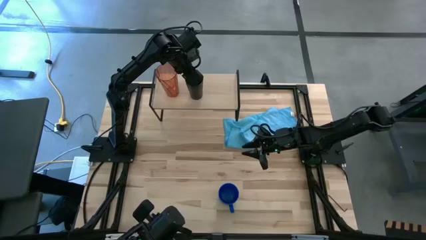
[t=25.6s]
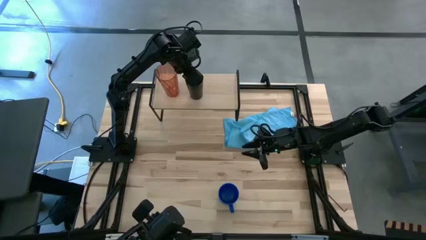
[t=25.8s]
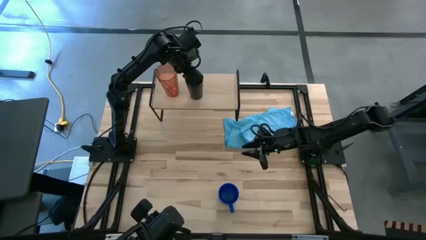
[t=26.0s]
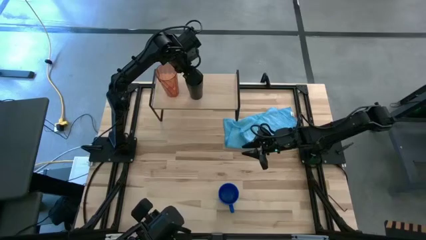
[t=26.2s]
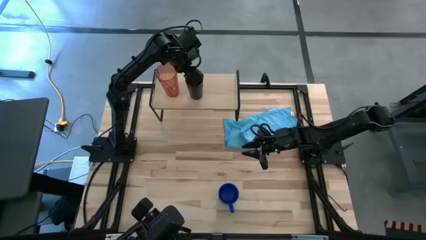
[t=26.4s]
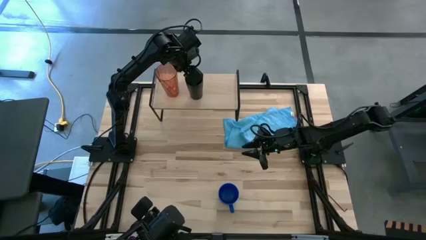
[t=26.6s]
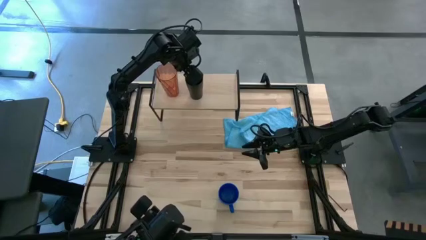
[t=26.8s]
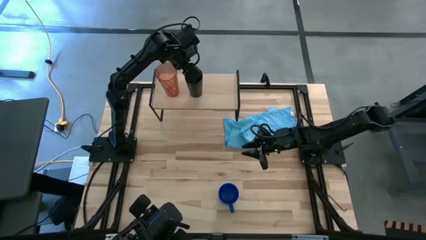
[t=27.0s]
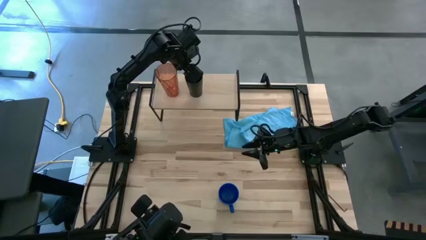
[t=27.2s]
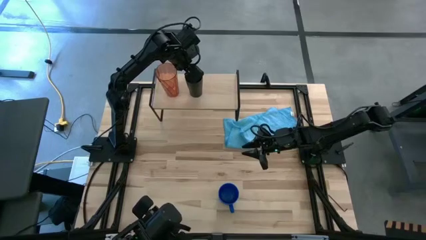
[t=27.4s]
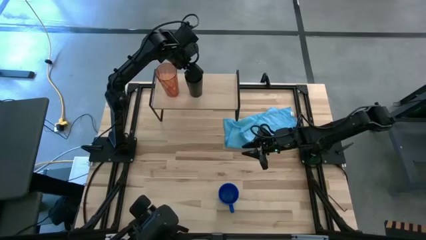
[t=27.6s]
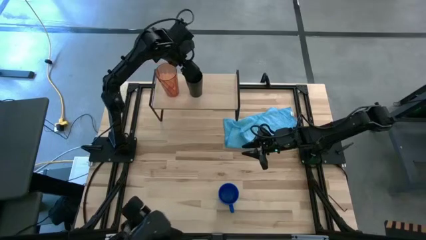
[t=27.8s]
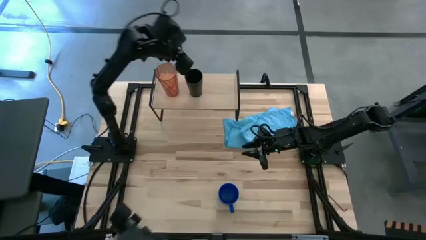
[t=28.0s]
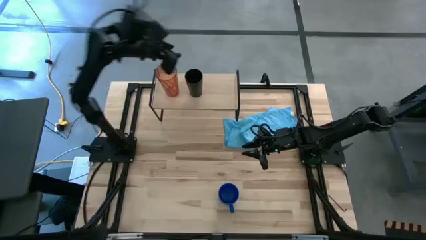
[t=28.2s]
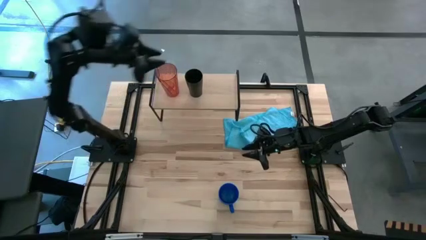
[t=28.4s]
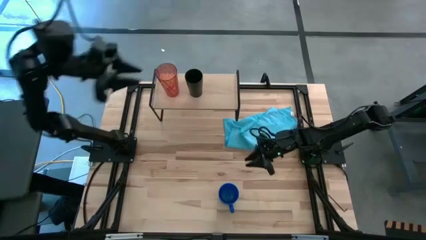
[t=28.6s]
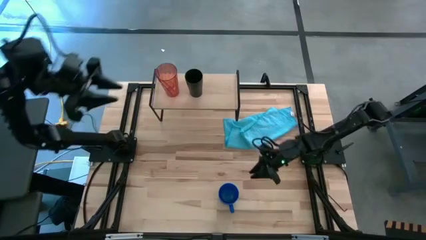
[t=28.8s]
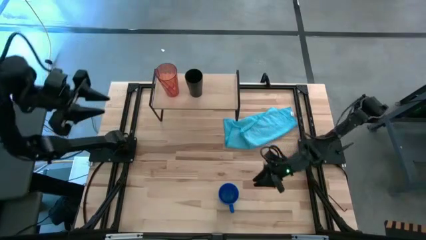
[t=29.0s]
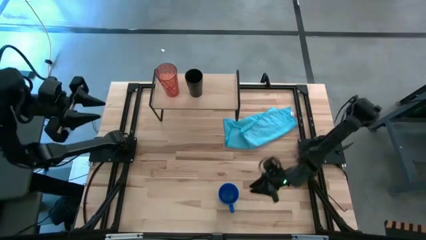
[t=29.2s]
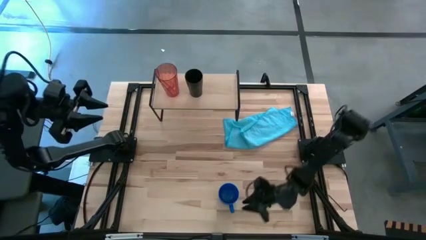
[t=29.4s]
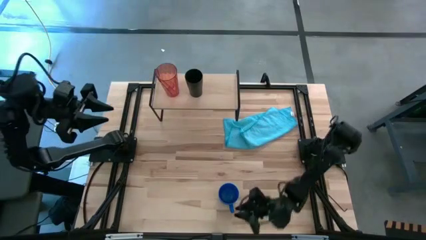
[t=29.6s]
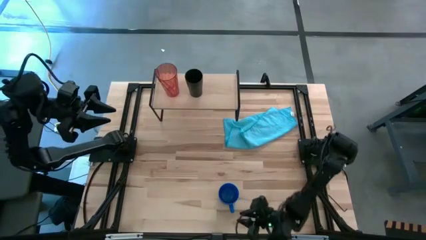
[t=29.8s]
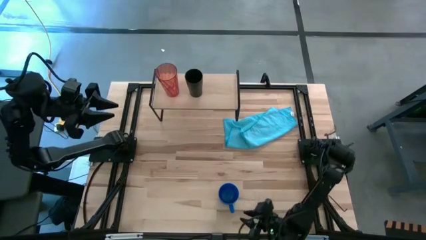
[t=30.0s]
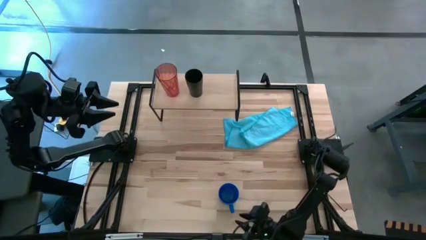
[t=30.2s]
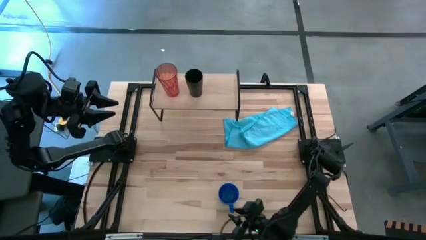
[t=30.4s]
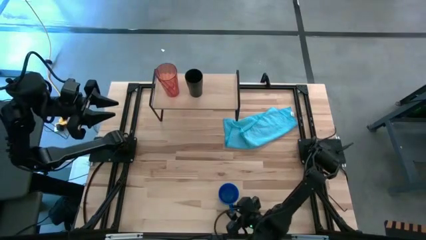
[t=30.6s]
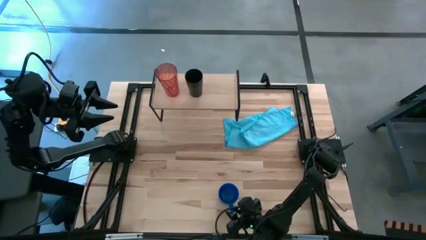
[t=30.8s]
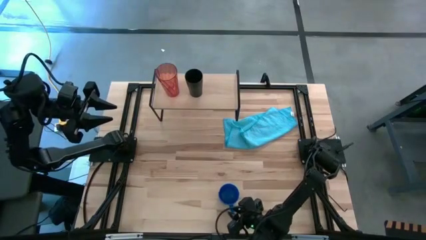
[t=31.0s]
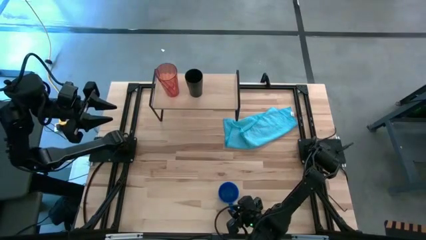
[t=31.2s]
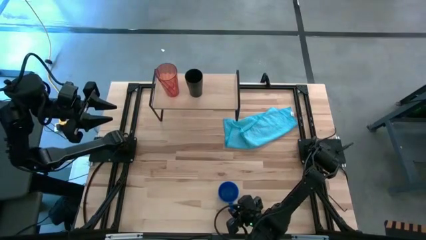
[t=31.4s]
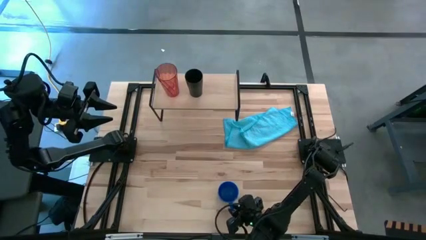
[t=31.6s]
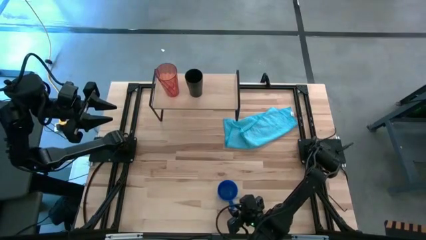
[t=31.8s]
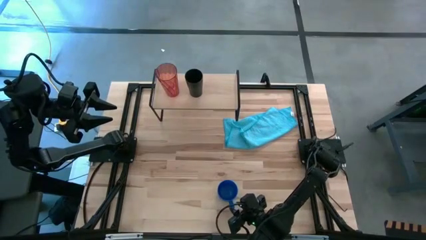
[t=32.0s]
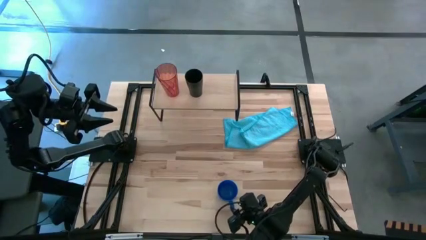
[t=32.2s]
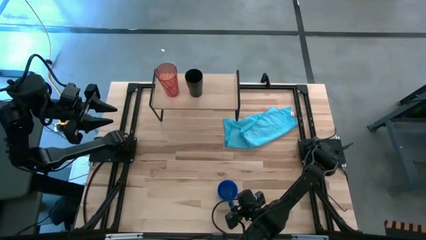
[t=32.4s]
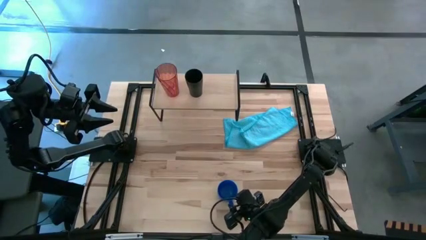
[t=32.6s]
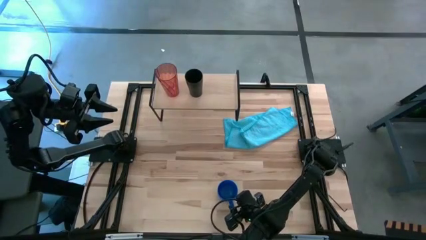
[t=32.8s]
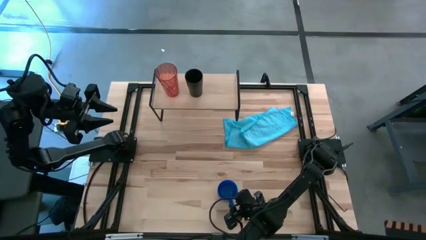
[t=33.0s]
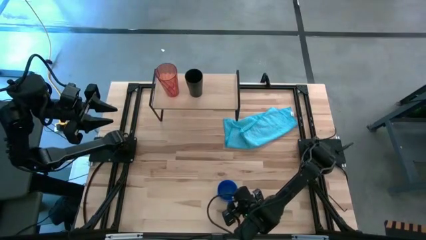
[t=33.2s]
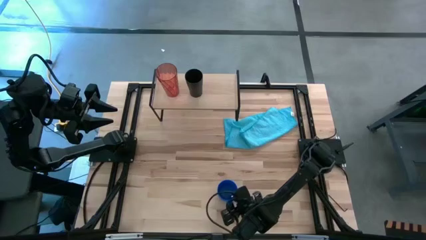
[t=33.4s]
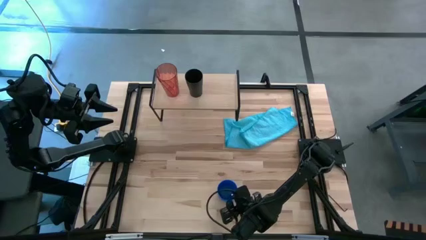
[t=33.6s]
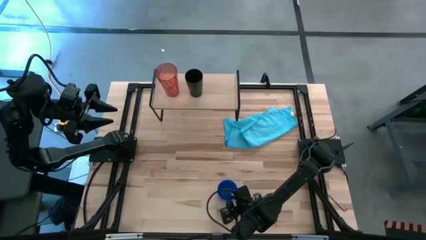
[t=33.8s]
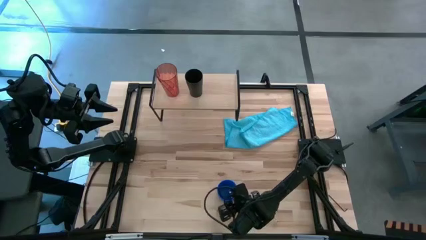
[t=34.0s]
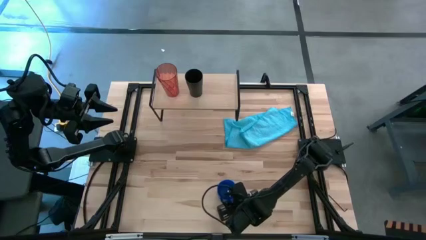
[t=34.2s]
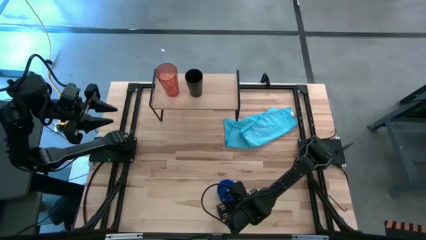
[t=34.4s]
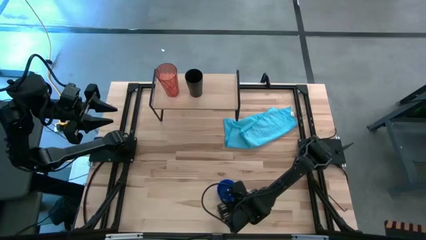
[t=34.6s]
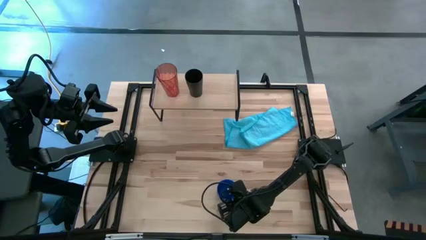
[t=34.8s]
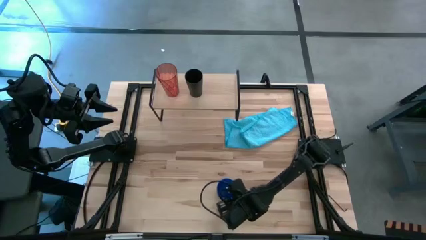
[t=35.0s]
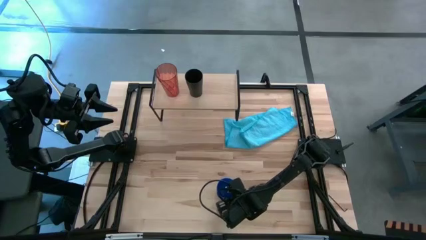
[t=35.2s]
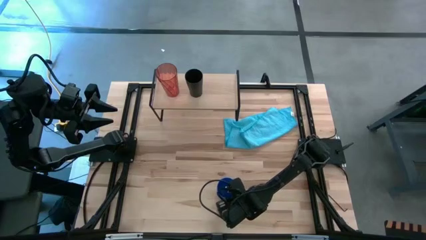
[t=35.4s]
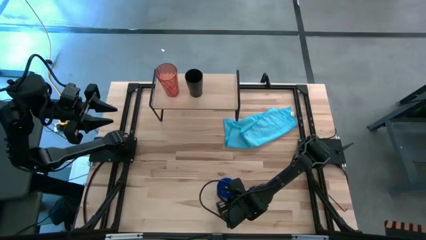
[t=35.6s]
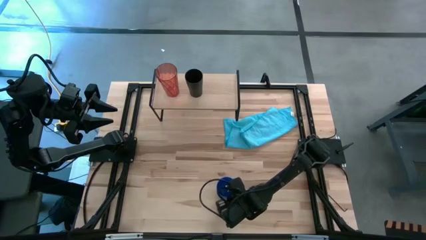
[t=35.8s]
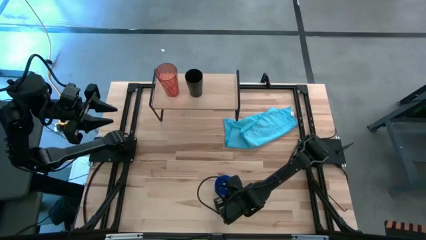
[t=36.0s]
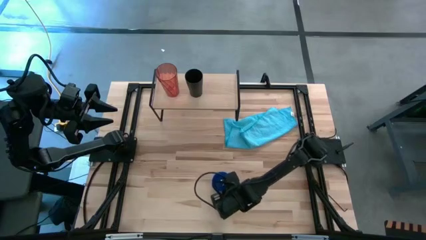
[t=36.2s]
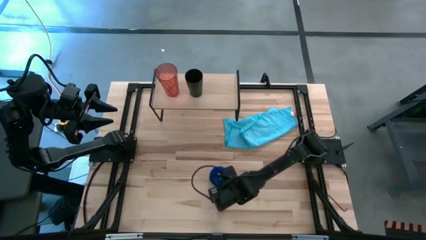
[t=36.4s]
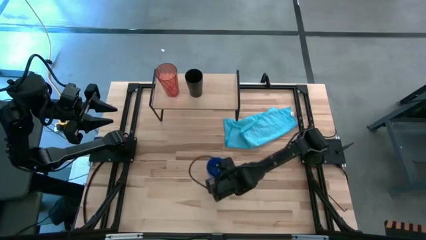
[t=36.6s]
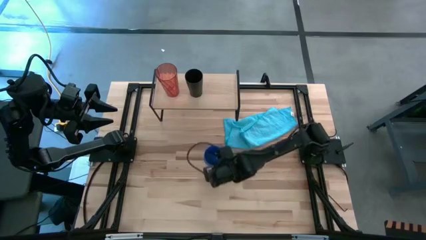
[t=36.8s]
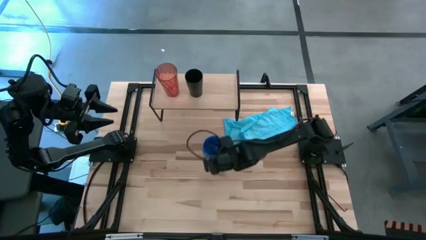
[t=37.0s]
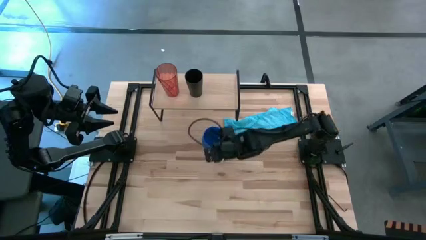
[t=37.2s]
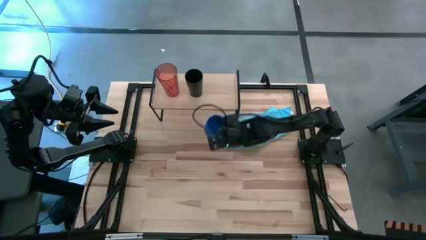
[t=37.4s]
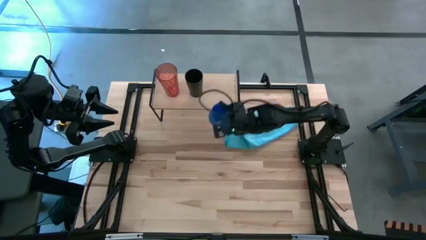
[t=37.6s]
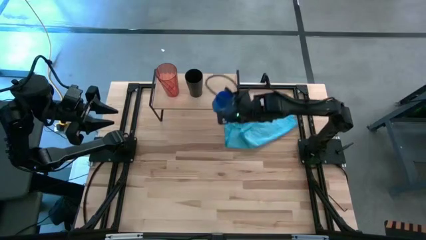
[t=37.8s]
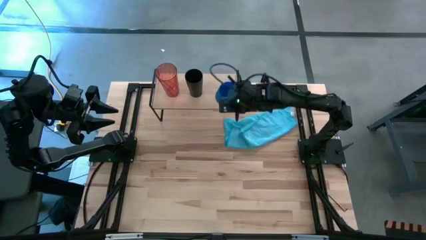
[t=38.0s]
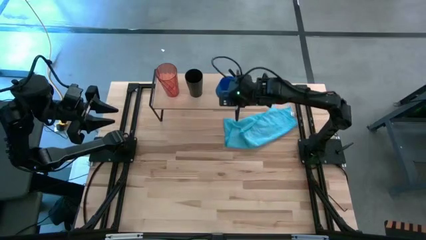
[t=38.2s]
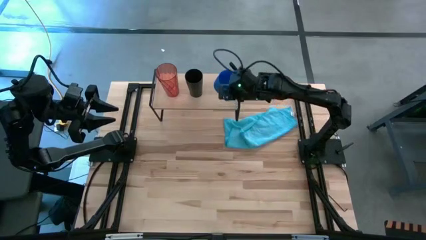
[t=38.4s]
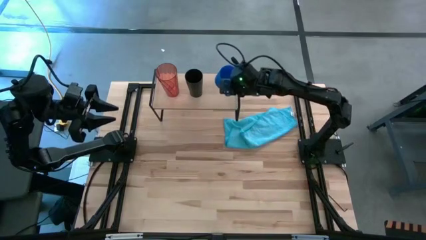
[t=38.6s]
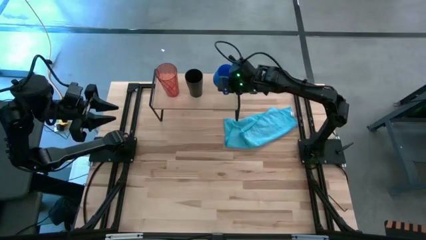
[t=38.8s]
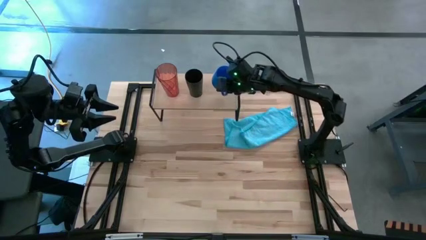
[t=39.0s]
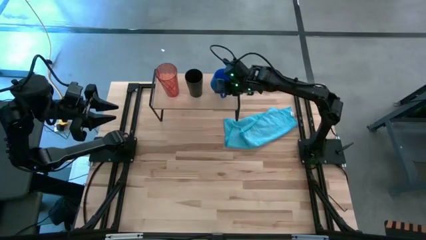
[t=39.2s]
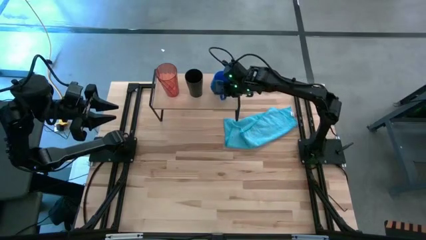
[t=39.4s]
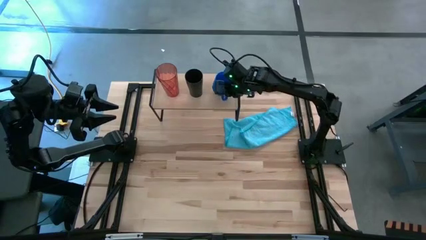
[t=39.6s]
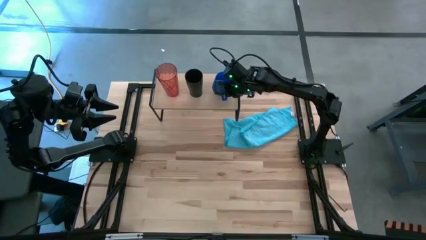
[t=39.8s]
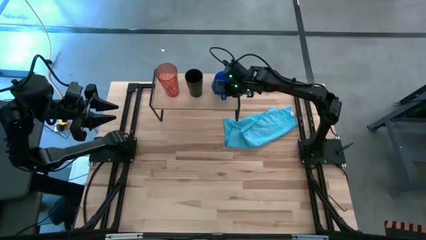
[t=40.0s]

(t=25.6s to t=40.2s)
Task: Stack small to large cups/mugs on shelf
Put the blue mug on the shelf
